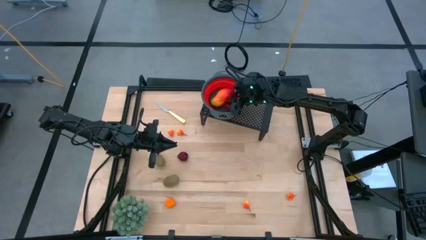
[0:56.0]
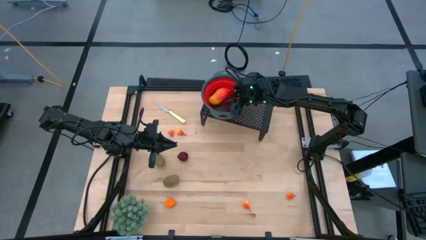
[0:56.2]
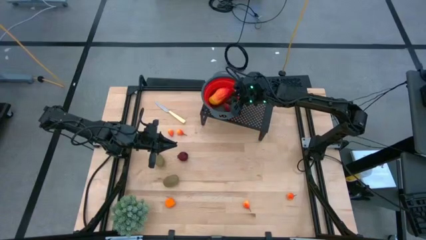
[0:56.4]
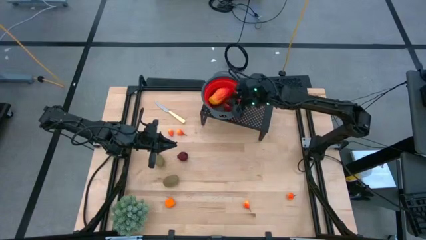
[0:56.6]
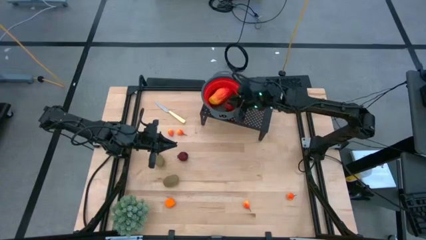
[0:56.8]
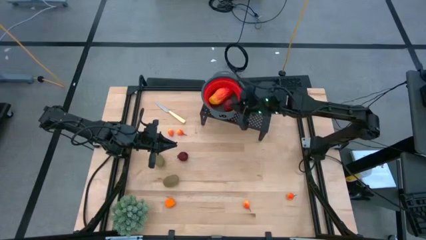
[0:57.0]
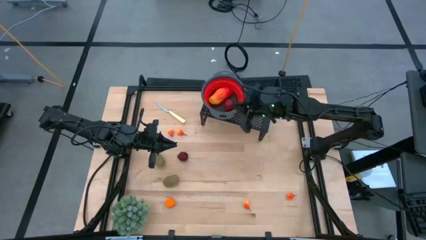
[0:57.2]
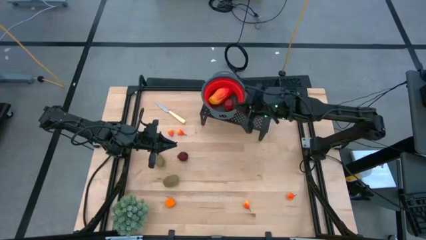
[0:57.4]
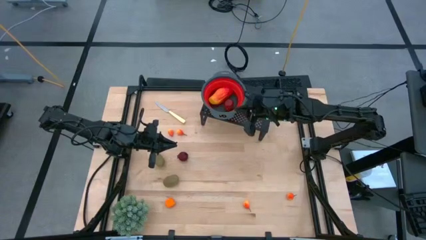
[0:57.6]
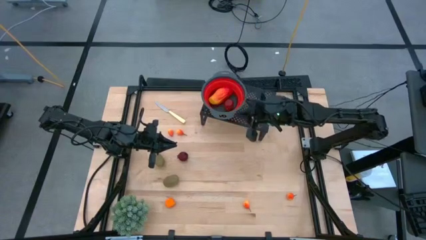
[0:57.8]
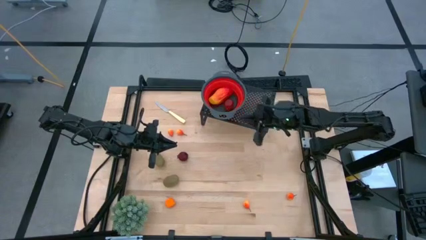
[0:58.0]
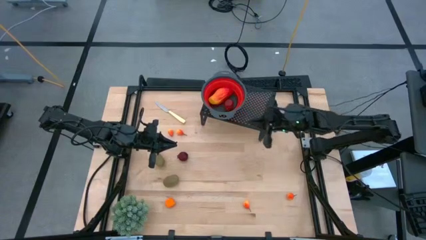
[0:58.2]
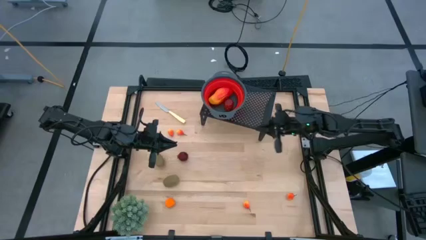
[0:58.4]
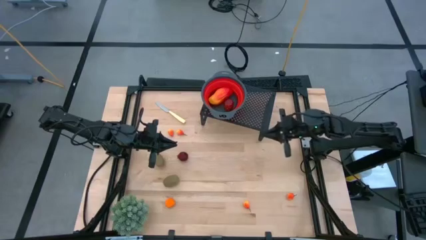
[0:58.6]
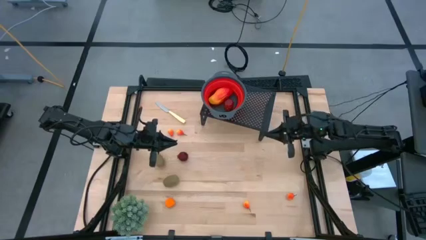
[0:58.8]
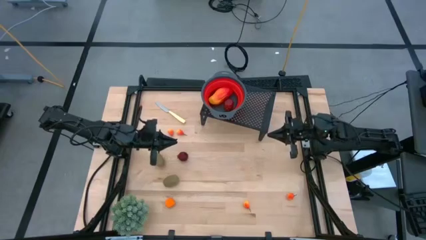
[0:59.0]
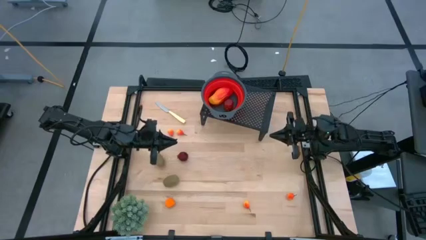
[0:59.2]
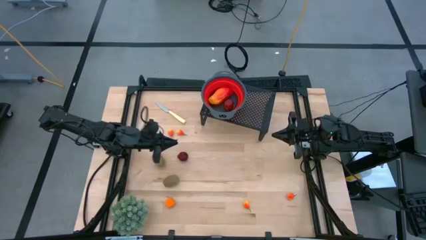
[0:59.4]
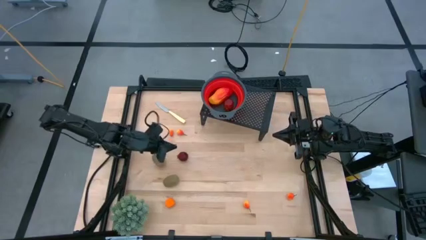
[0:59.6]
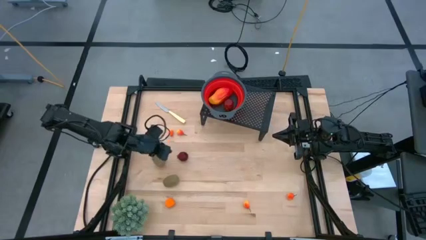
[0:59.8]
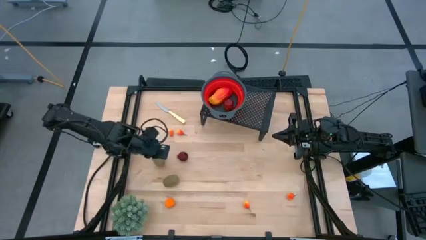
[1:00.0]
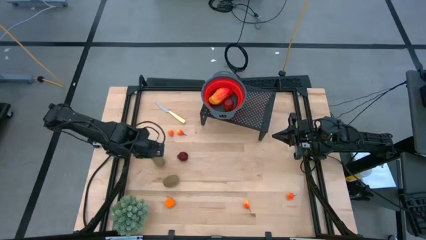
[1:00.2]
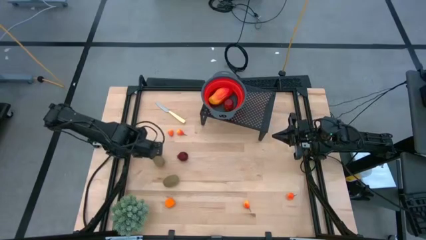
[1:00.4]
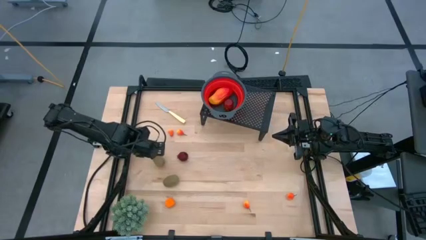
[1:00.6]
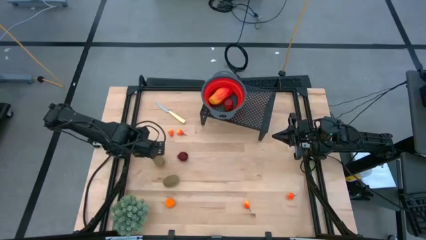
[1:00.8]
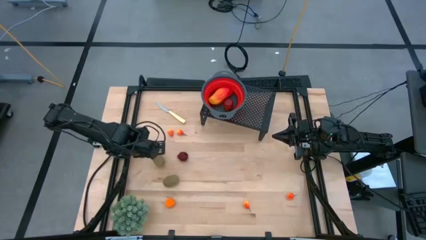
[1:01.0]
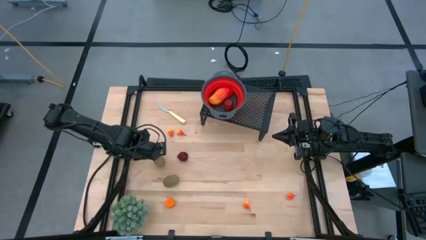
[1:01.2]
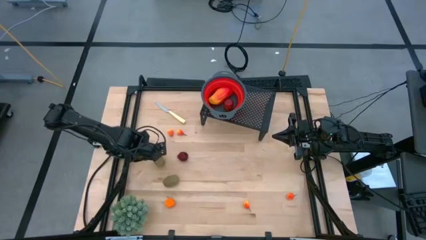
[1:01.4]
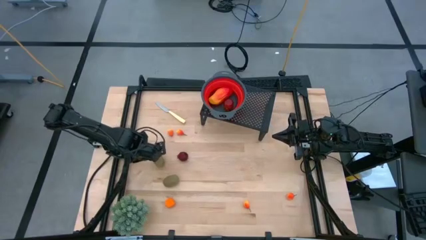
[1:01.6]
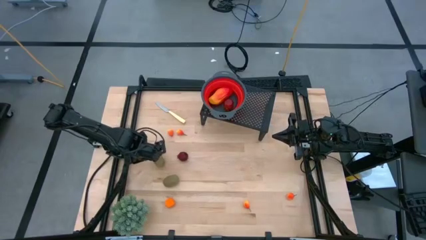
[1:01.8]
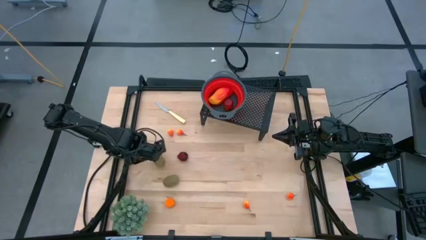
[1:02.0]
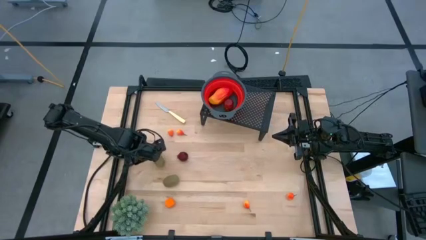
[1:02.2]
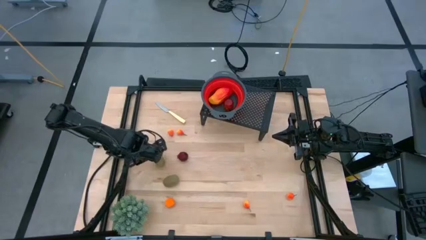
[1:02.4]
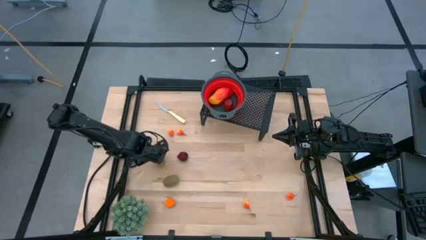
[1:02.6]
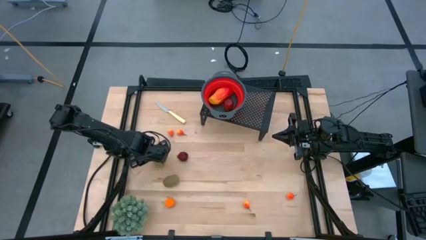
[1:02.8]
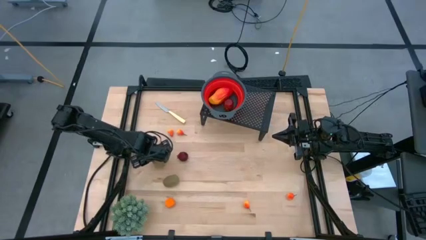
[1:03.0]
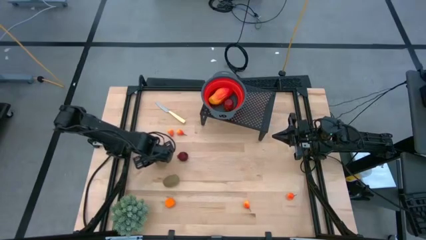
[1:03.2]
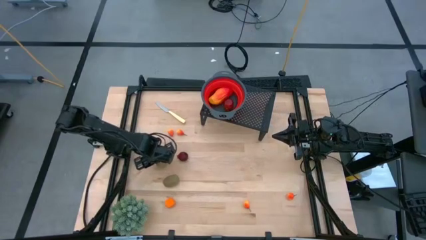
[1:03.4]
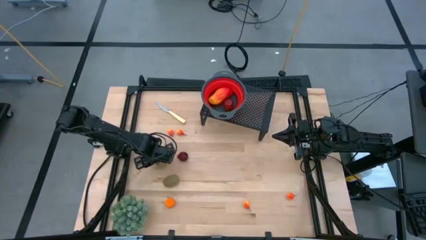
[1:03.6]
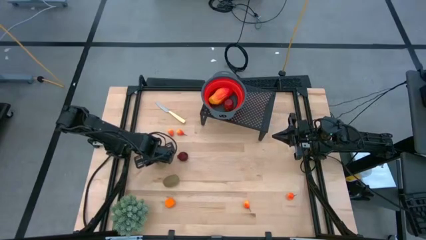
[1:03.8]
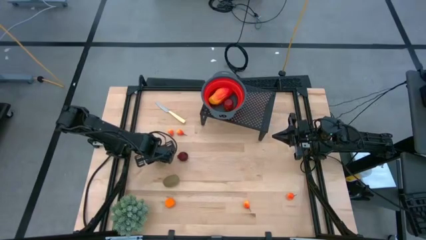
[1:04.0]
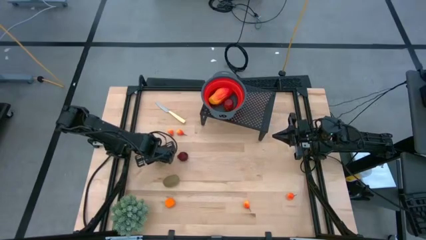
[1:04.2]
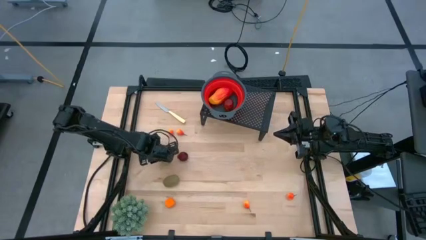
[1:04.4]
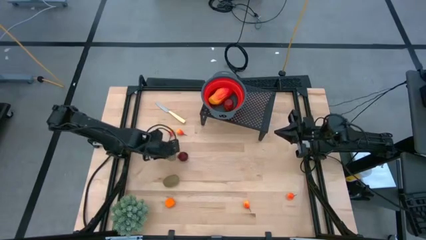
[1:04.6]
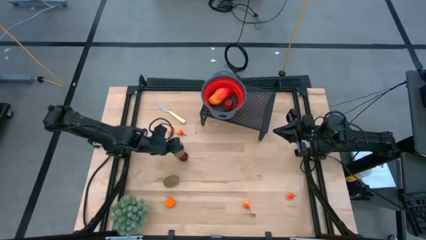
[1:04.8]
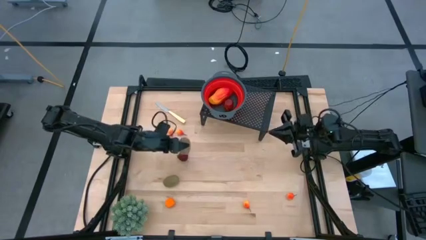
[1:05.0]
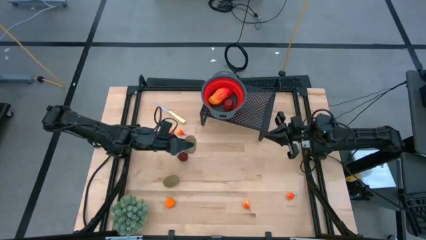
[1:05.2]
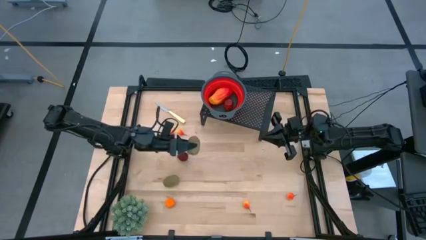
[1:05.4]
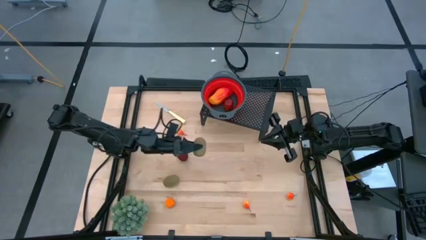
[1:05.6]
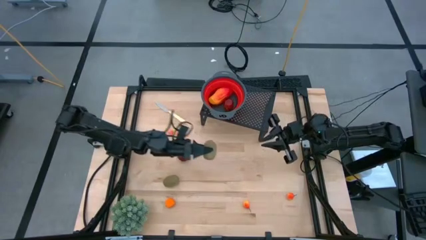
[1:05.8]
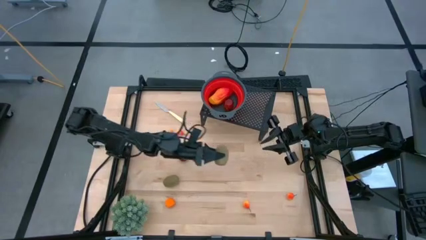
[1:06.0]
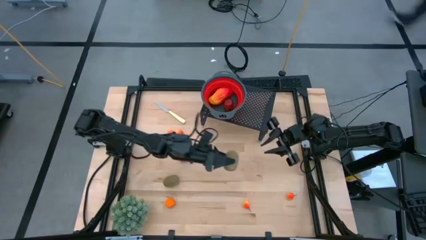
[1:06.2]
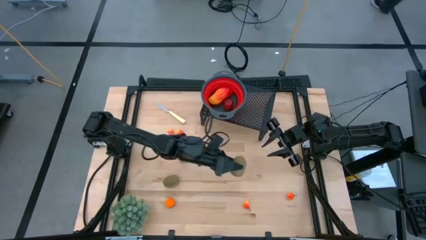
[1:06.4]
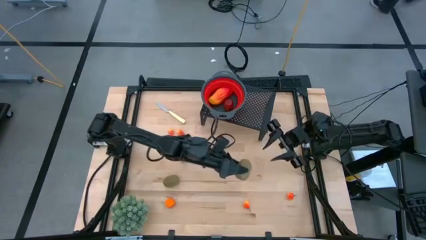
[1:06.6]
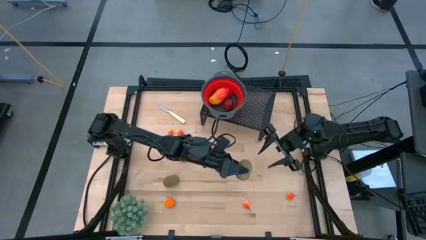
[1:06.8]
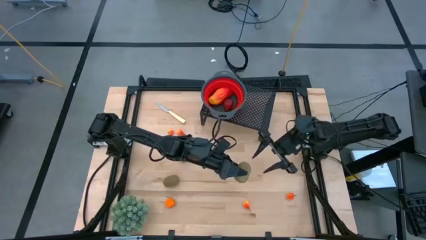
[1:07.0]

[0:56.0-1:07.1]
Task: Pick & Place Fruit
Put the top kiwi into the strainer bowl on the shelf
